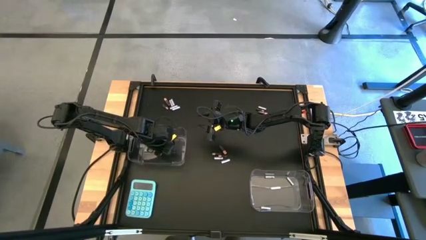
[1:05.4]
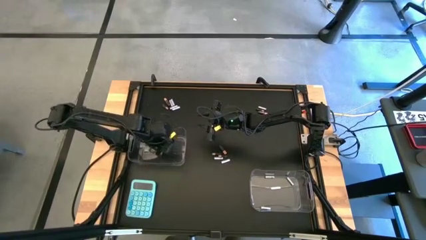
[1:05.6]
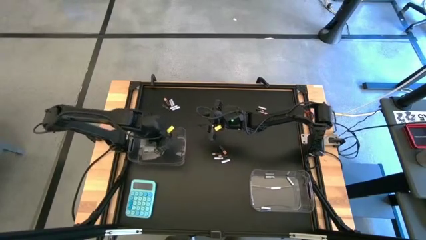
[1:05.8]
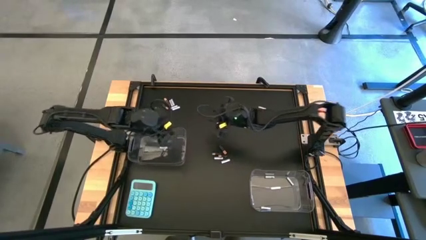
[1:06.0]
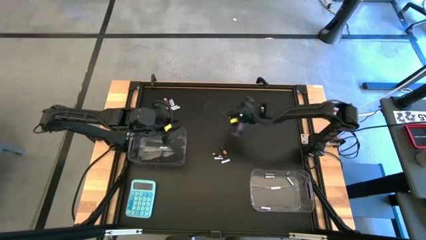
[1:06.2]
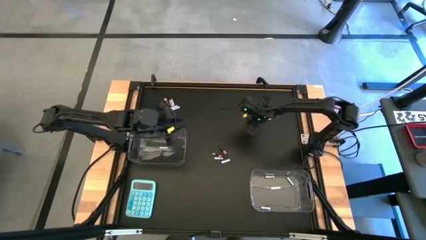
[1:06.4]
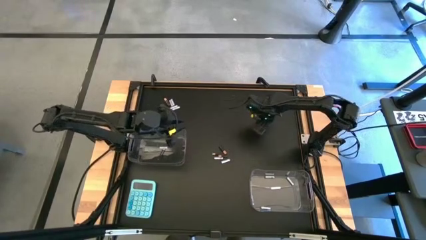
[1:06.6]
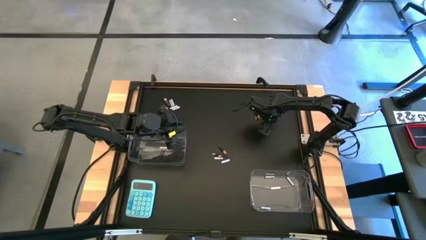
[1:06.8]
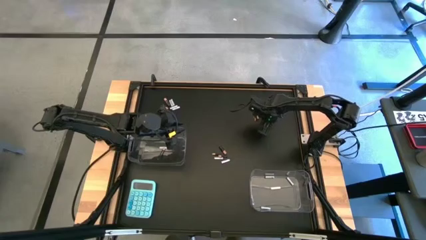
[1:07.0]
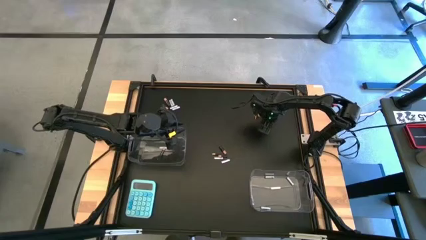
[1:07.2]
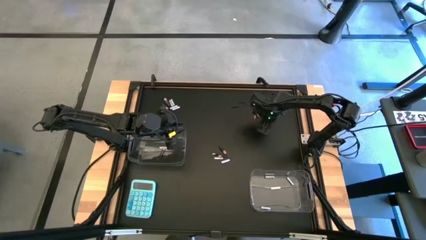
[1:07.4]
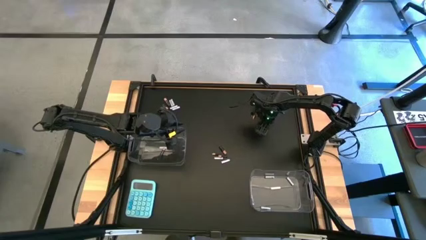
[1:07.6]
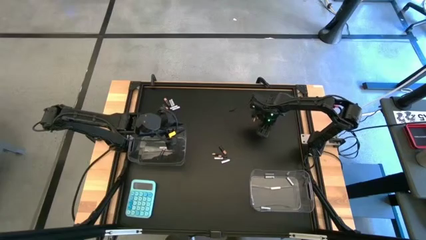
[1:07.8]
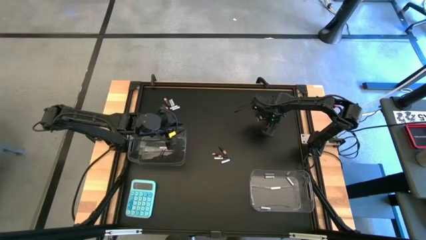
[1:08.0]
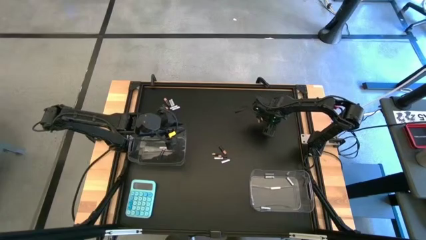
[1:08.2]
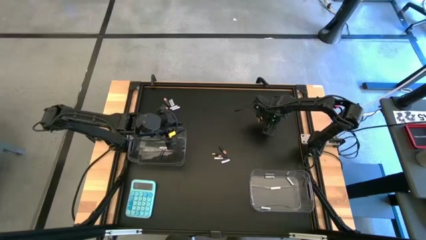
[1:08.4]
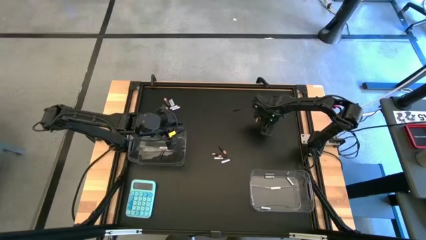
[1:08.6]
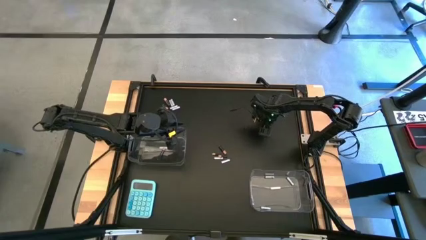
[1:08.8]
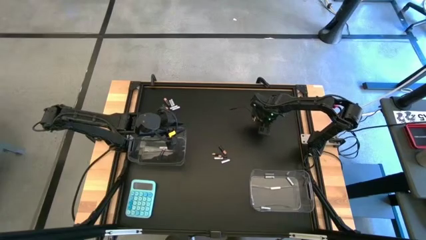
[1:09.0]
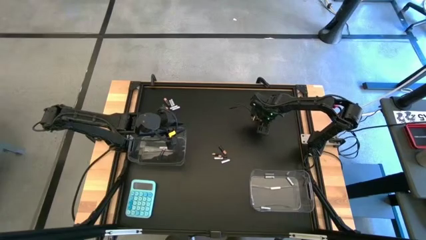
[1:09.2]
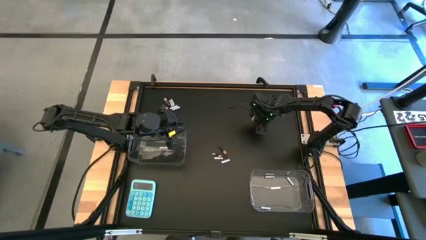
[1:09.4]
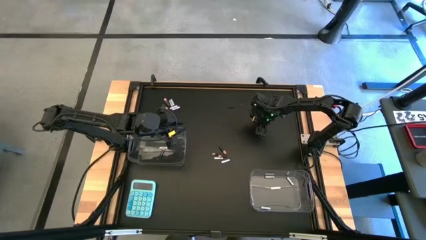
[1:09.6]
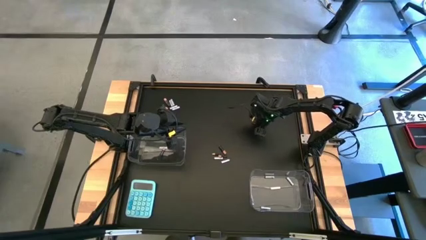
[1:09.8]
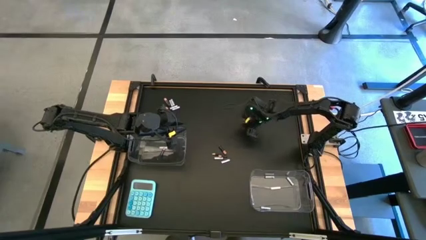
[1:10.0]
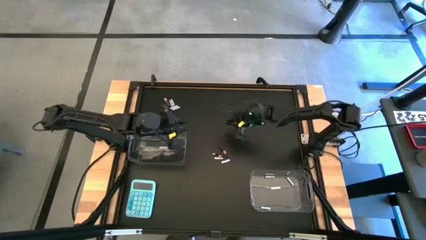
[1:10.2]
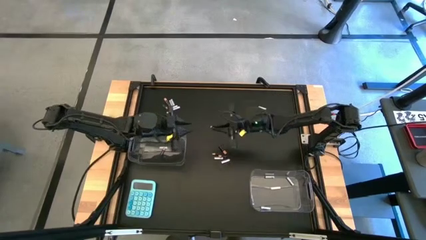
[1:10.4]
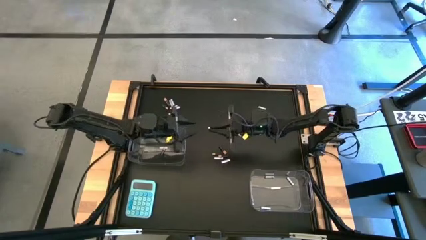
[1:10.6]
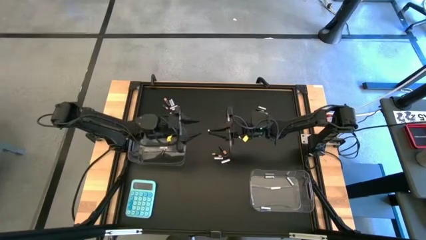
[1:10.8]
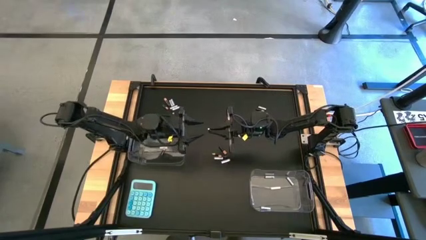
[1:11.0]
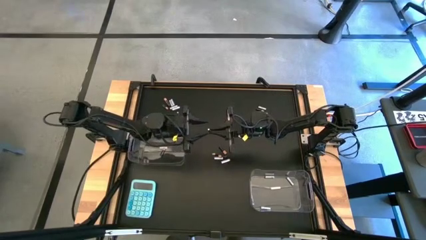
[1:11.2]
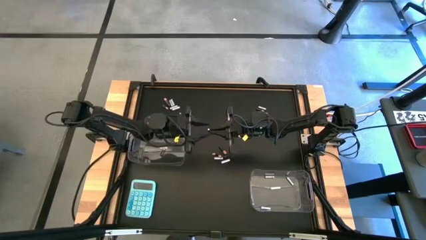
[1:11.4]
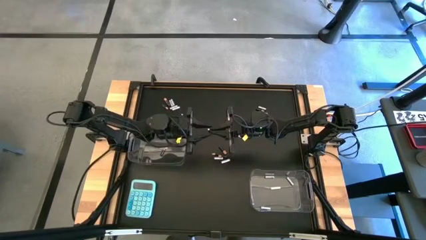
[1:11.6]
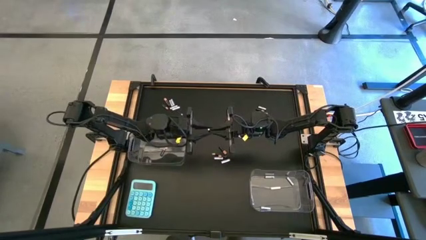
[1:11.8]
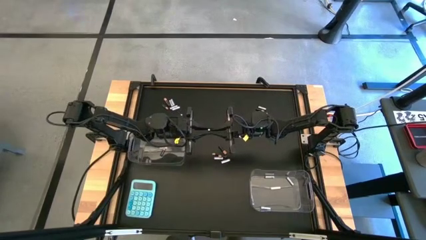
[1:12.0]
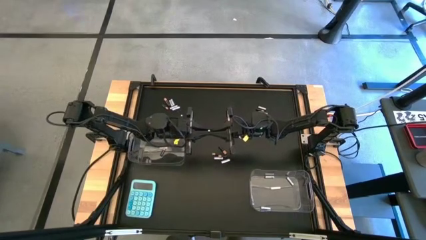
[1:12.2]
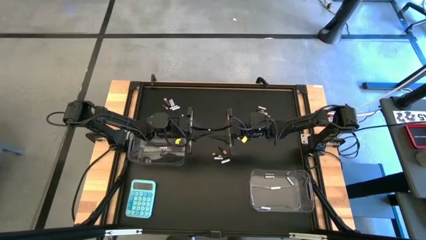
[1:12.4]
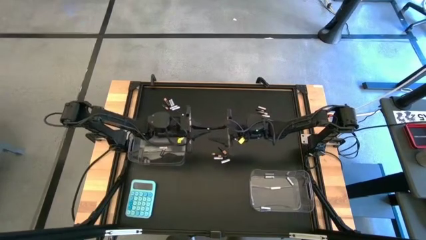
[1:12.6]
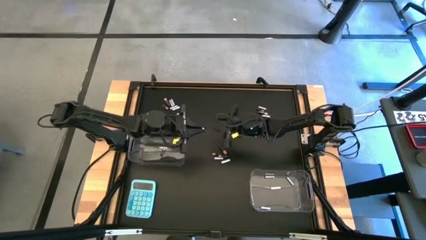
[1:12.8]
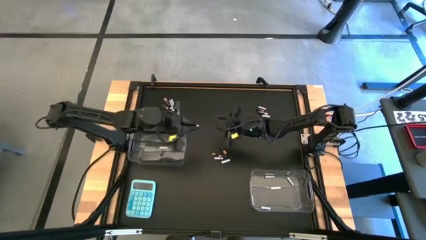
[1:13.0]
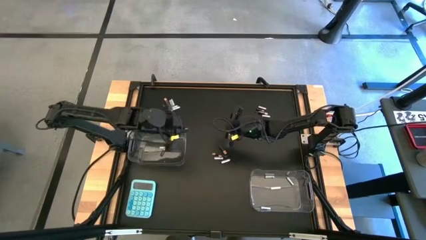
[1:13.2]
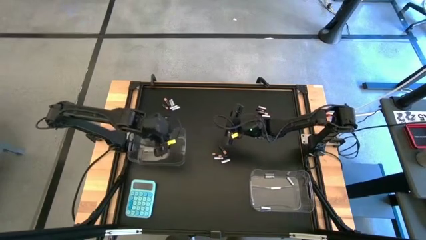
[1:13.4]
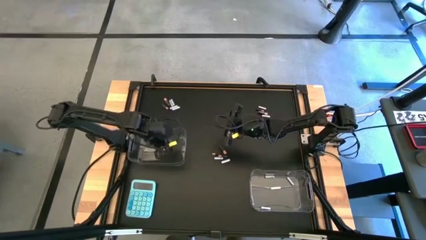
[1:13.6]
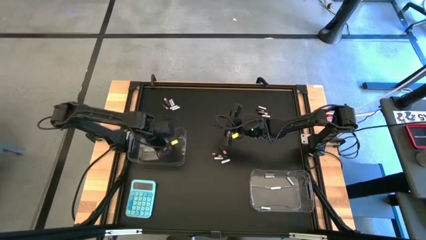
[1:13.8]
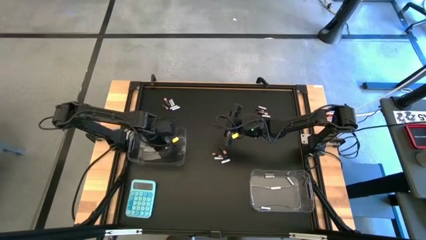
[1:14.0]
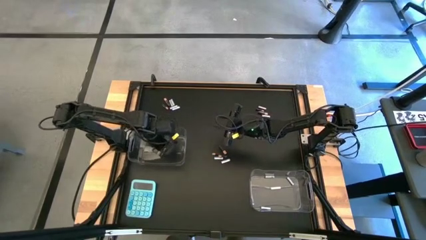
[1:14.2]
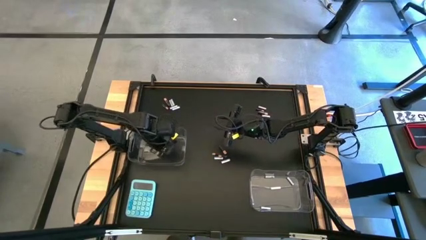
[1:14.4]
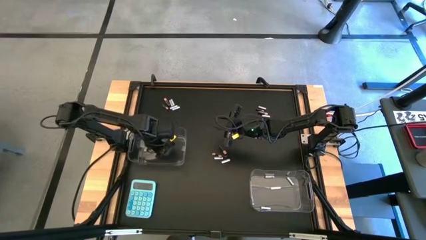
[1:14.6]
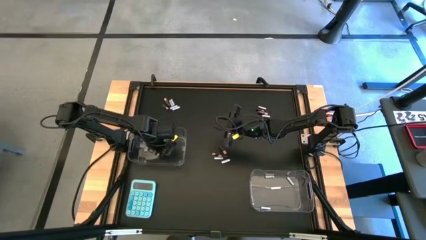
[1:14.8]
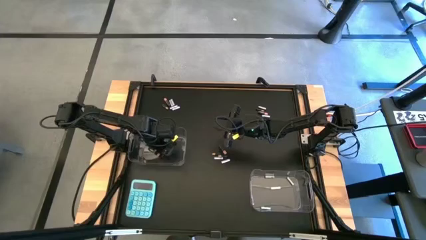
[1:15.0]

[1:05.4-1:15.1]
Task: Sort batteries
Put the black battery into the left transparent bin

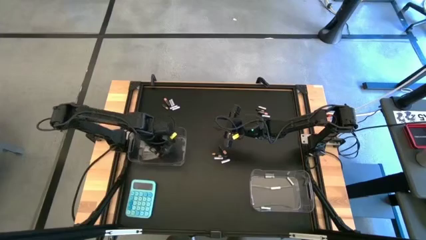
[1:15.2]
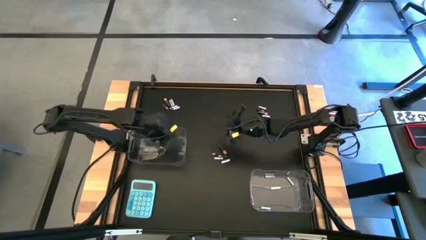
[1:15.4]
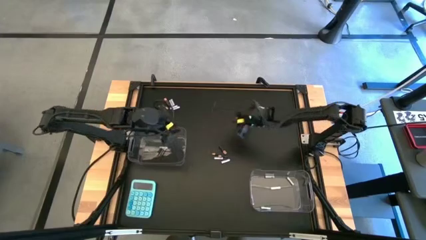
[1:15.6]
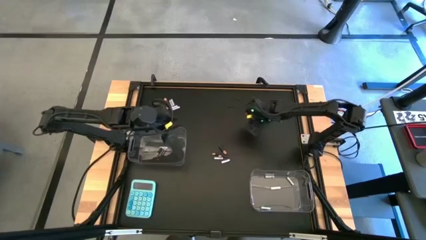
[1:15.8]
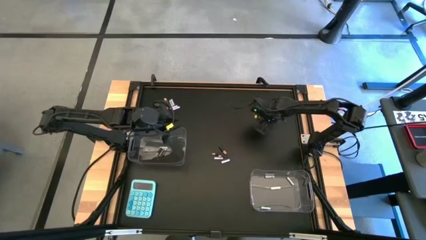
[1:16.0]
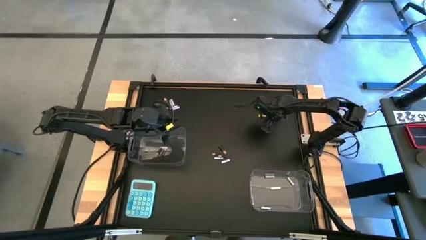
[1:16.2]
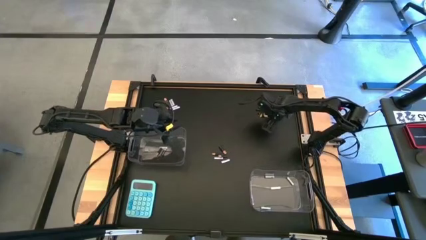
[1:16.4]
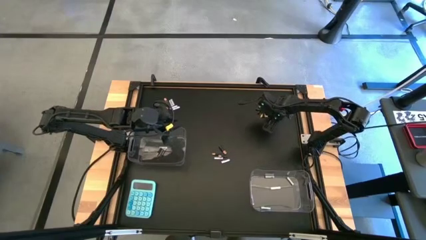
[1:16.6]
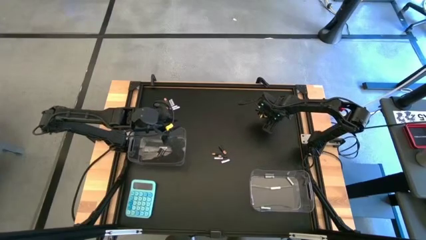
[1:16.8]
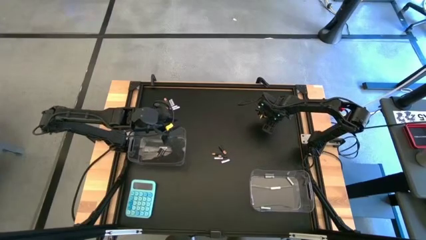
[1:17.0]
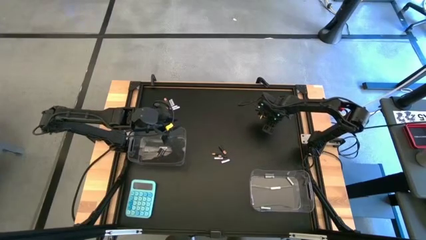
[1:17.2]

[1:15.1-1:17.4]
Put the white battery into the right transparent bin
